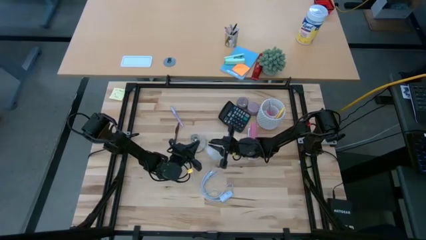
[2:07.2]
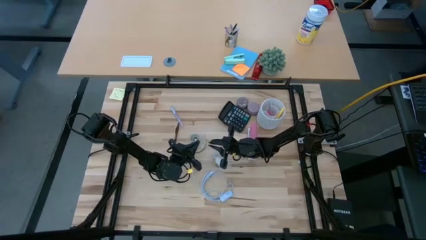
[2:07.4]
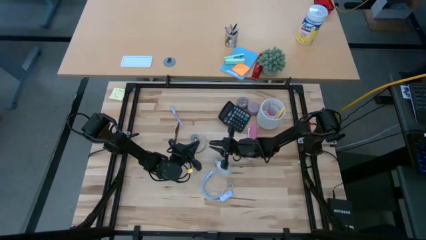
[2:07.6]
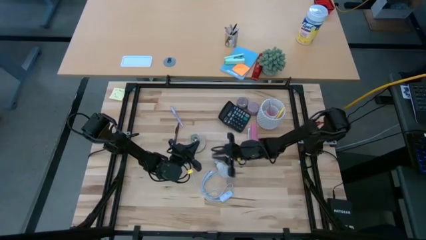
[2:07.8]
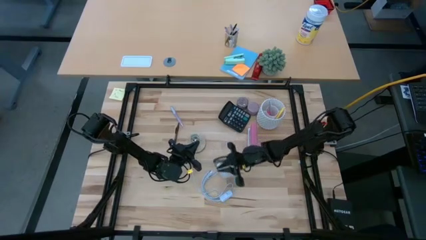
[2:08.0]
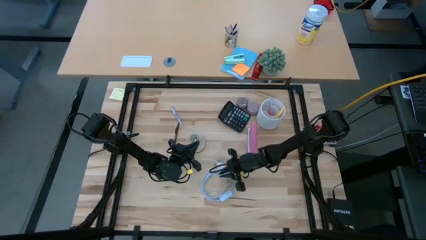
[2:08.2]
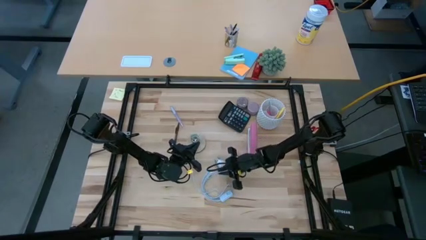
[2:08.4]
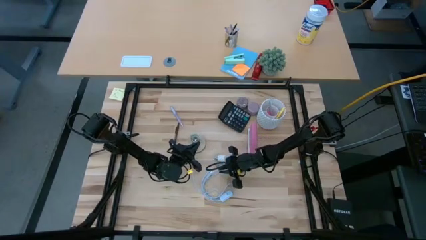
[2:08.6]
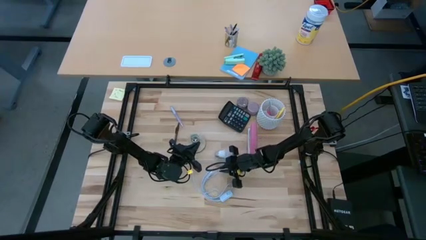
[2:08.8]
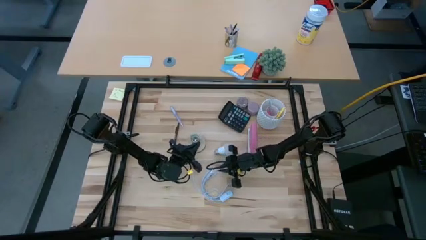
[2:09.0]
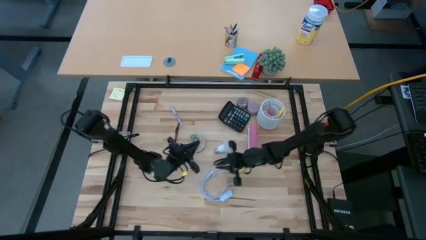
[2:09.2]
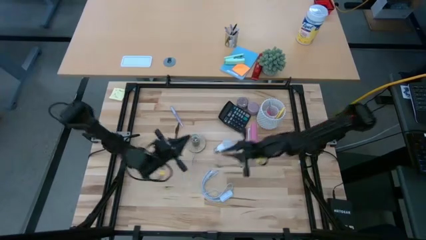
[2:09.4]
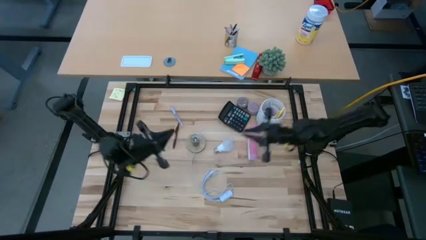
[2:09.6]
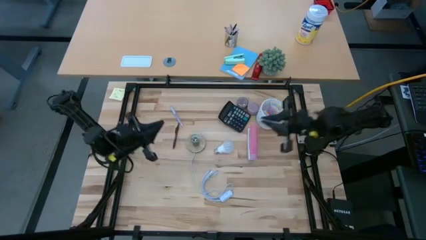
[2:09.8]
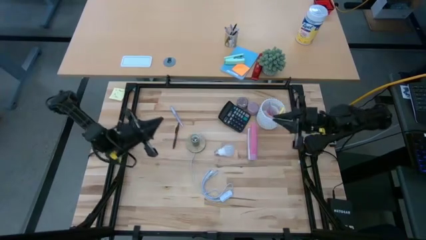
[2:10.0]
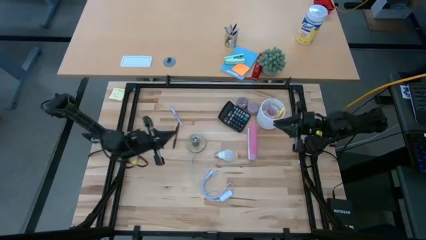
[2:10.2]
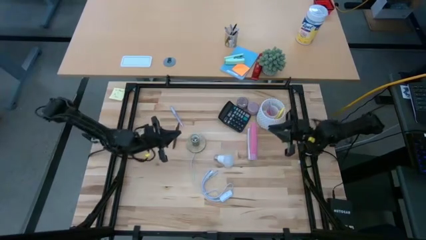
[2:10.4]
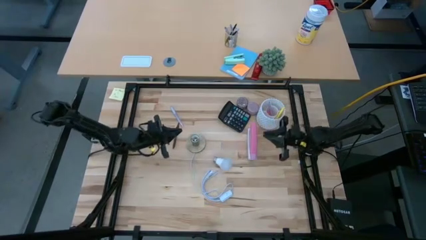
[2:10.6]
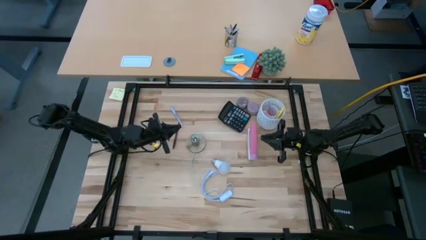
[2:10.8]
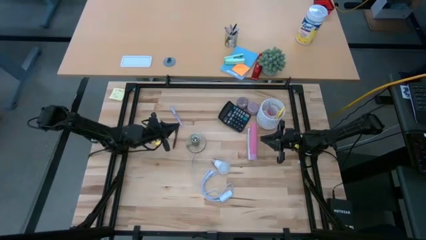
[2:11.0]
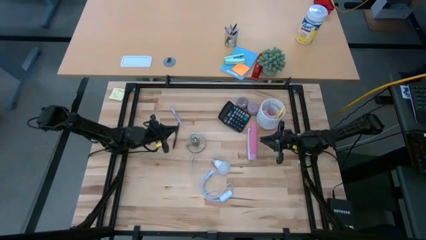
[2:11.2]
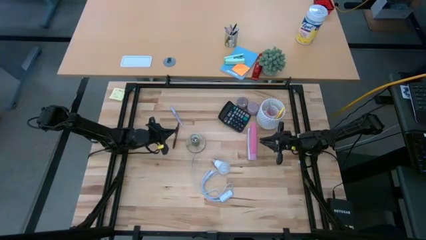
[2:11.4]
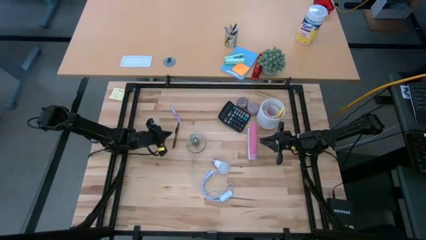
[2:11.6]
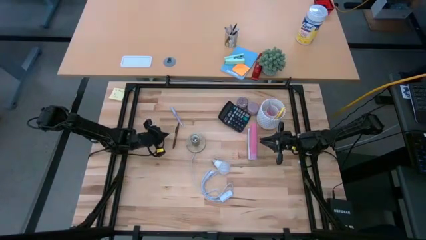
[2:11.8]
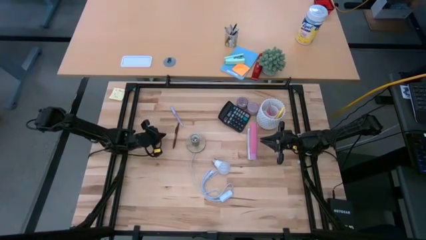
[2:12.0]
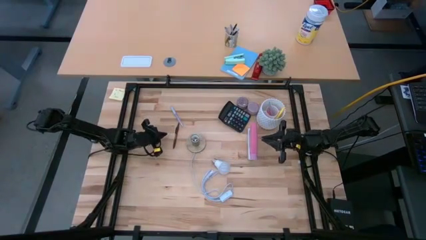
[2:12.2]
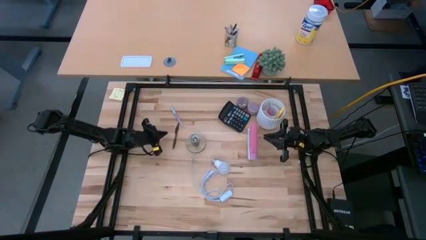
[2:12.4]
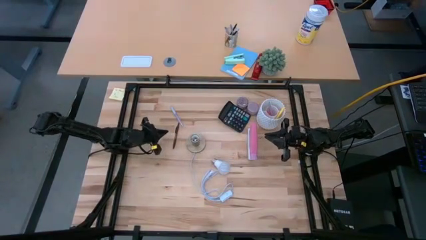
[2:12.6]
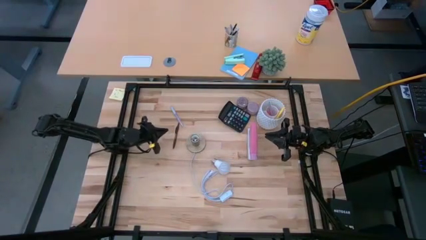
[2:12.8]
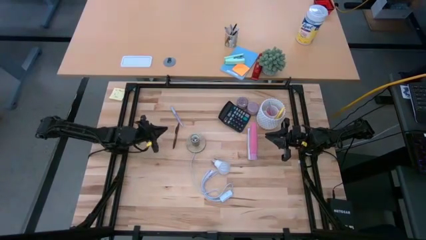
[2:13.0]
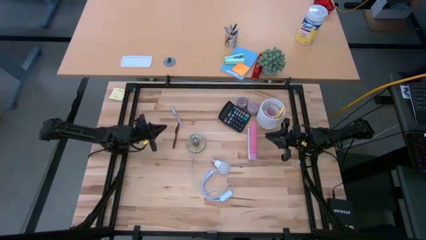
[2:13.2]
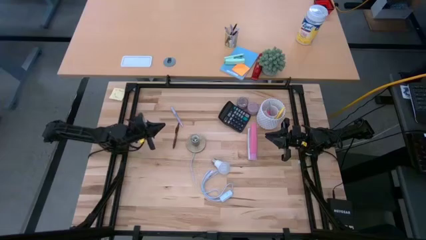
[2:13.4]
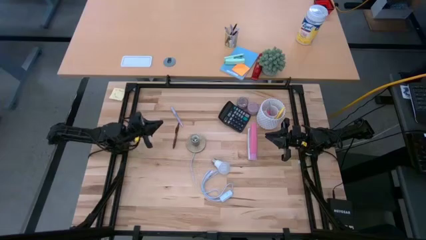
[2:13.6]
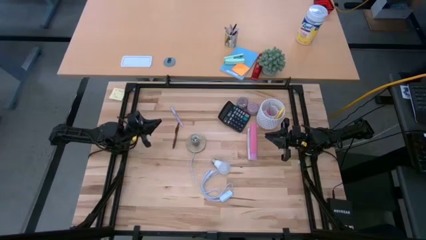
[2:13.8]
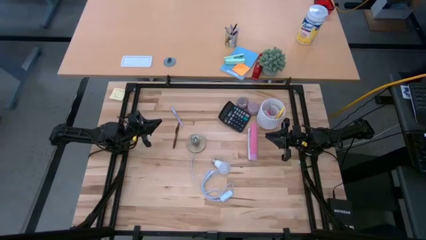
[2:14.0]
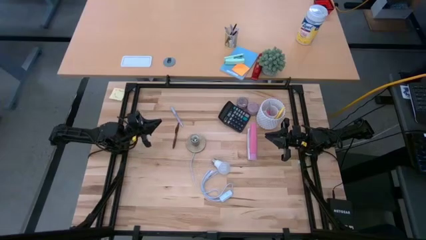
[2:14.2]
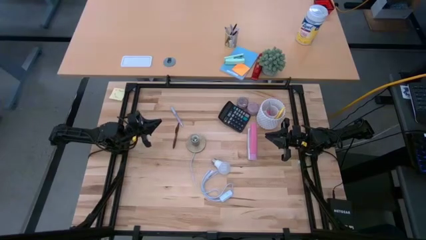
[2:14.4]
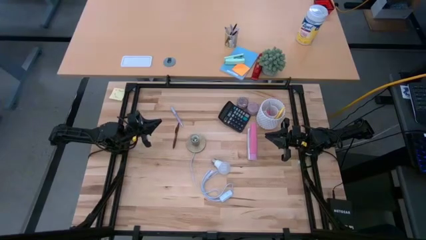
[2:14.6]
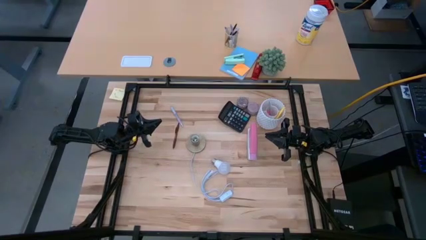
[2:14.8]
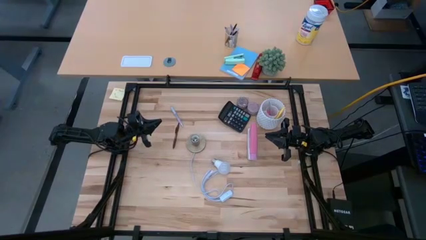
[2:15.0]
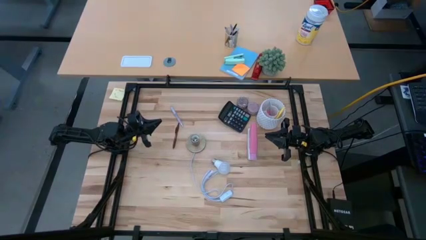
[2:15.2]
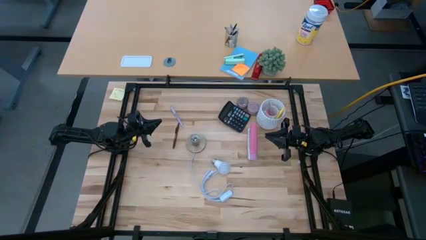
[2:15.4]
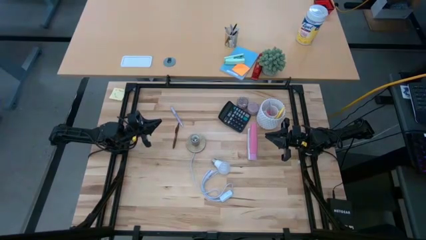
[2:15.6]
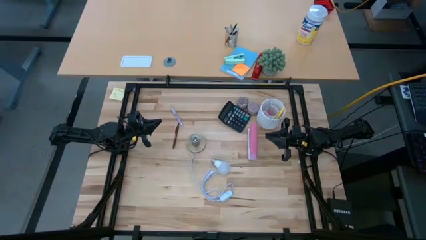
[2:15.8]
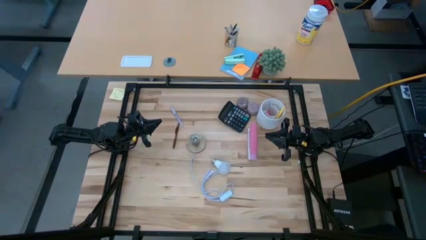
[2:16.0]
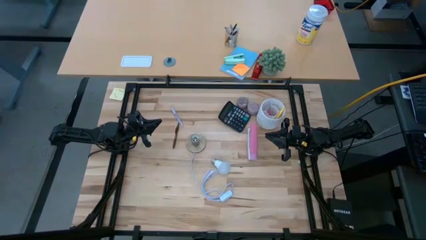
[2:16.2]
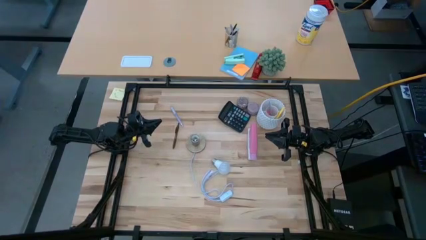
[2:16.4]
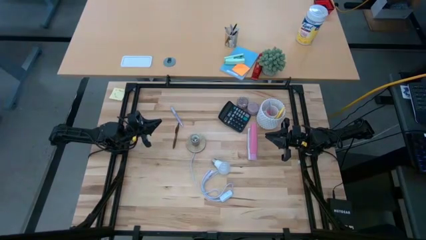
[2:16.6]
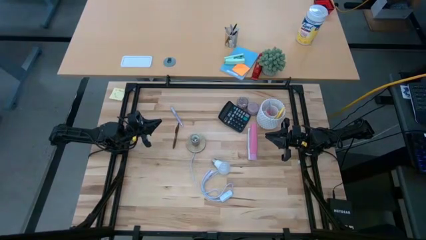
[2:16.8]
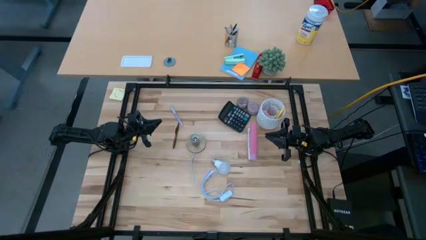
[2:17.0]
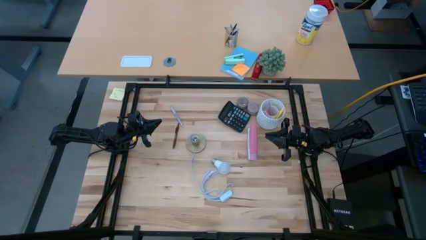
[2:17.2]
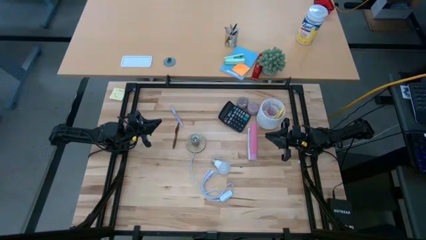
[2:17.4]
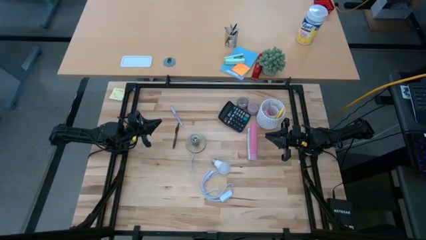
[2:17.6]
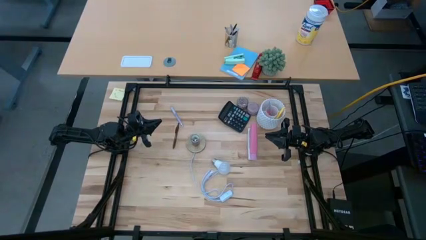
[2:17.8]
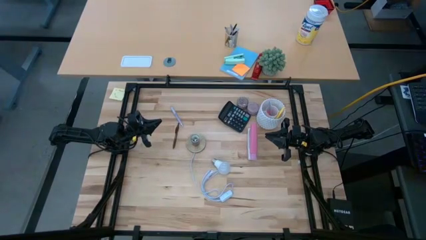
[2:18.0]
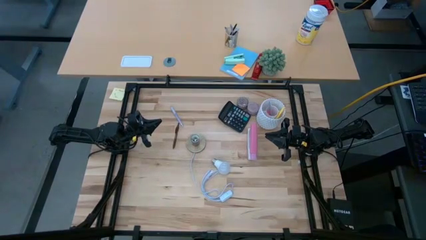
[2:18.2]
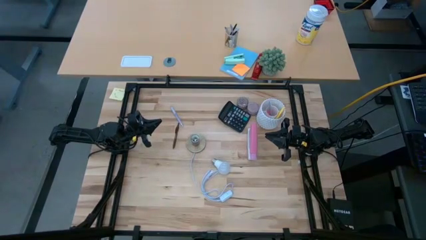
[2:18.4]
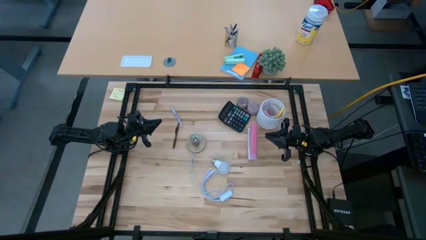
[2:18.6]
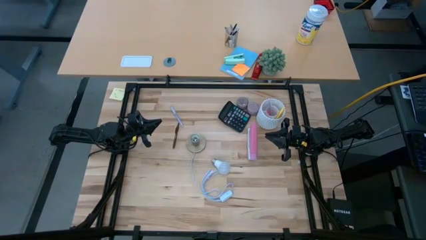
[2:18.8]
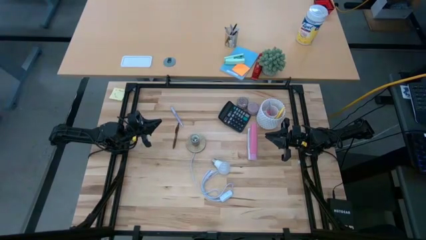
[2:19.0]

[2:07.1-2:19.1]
Task: Screw lightbulb
Return to Home Position

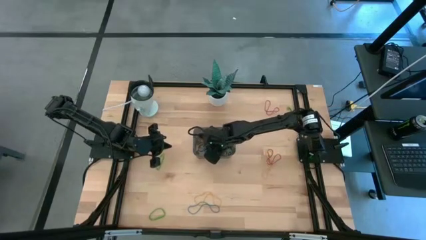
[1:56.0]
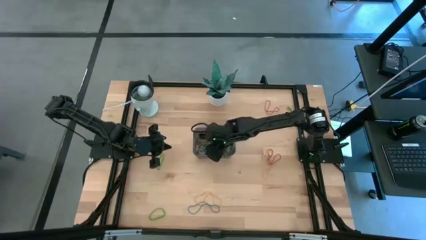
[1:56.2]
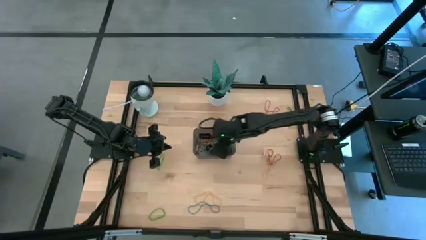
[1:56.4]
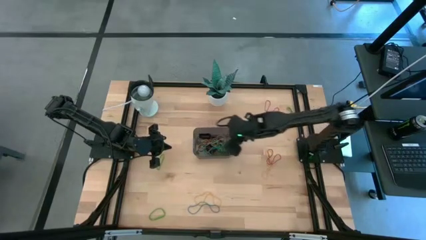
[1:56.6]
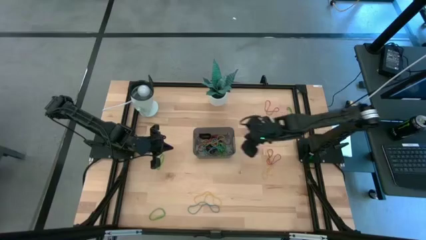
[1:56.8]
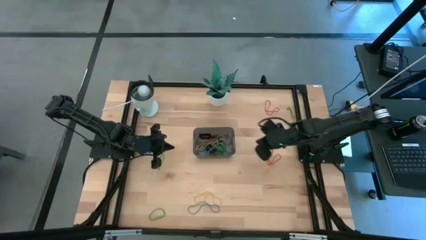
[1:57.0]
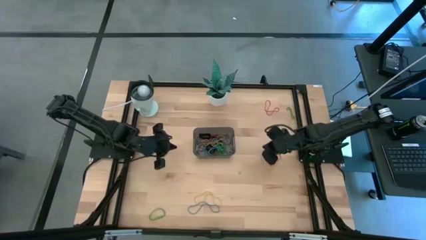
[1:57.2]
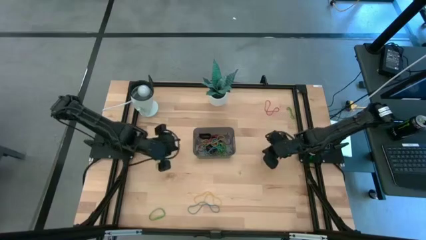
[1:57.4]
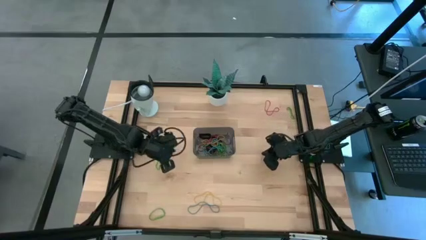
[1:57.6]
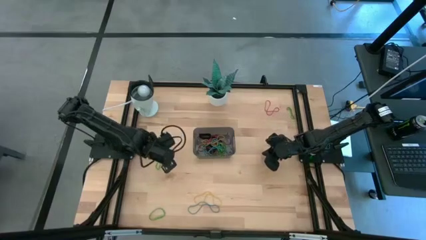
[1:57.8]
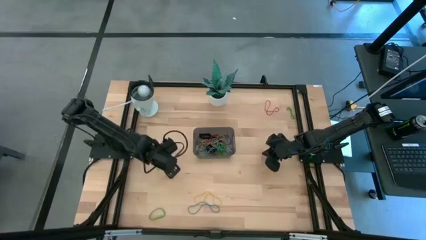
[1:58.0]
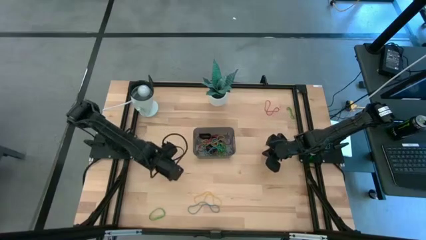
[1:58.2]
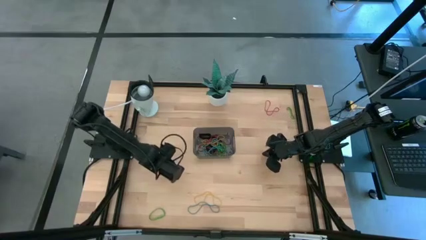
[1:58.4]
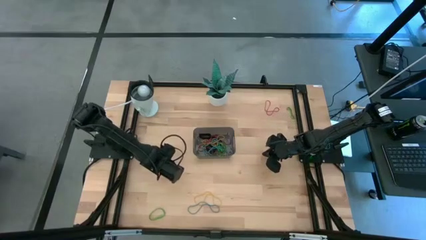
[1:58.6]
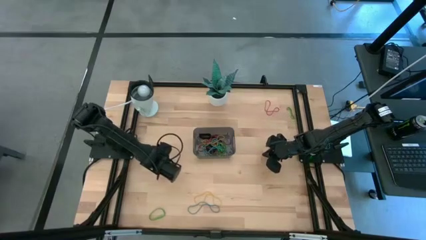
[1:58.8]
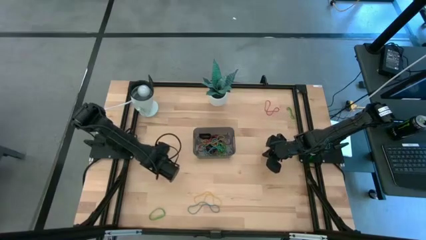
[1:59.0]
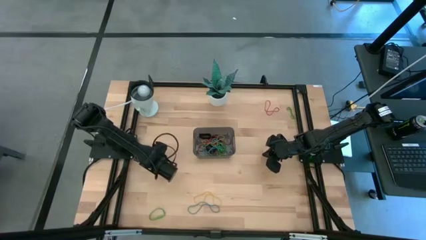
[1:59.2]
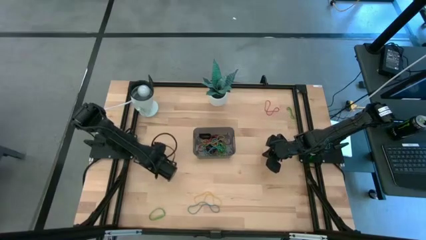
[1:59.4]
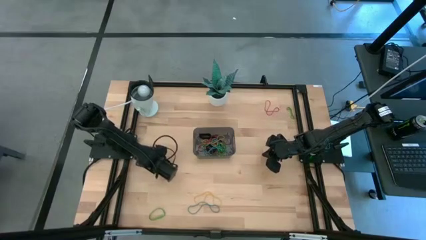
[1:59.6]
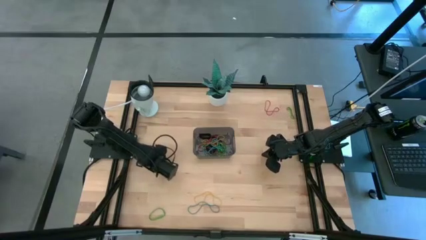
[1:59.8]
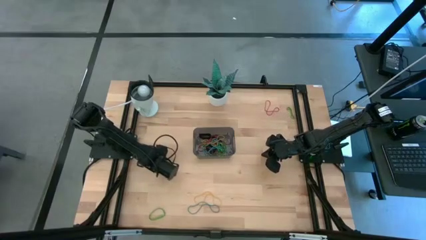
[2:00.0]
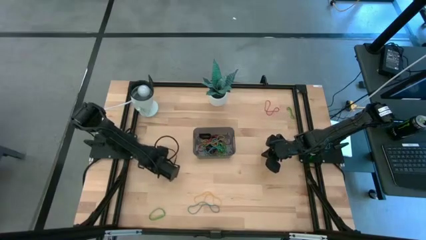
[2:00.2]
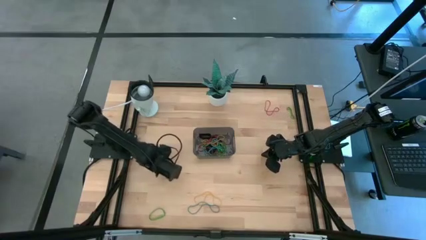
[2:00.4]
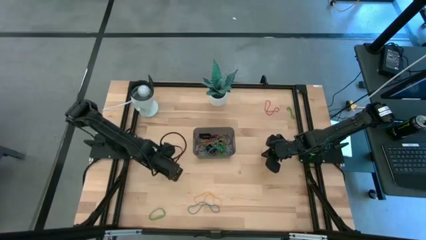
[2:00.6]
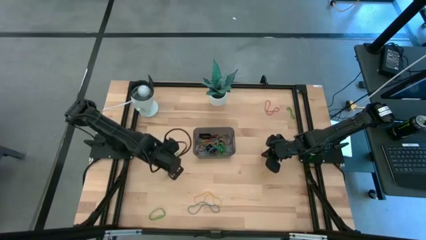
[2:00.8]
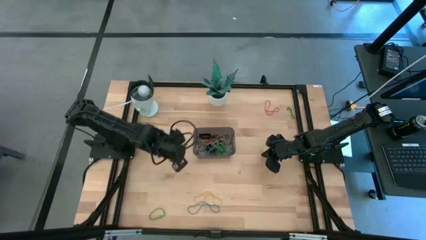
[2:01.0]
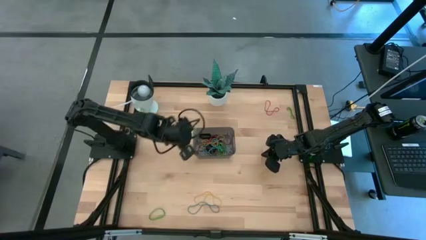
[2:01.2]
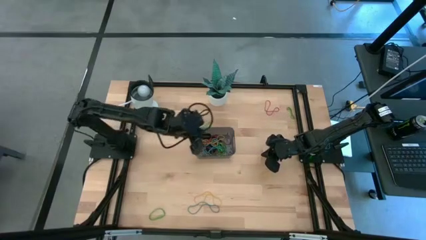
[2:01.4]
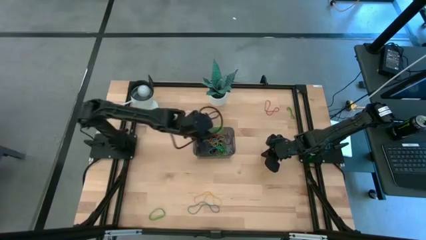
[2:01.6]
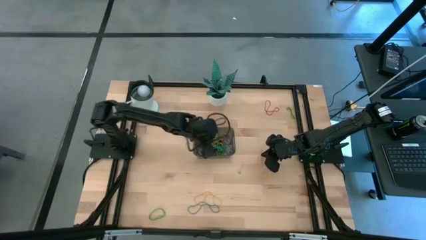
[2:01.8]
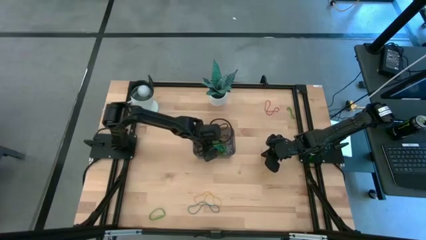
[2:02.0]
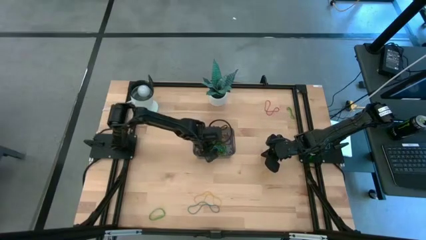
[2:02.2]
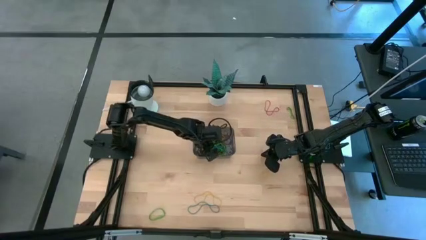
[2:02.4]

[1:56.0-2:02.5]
Task: Pick and place rubber bands into bin
Put the green rubber band into the black bin
